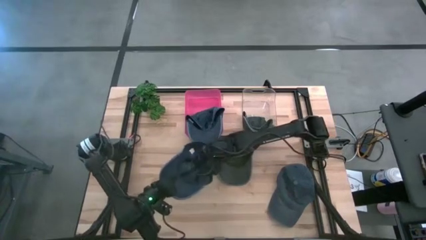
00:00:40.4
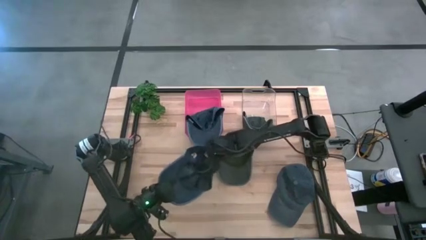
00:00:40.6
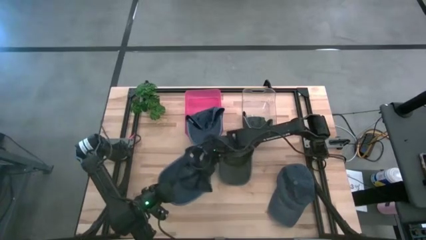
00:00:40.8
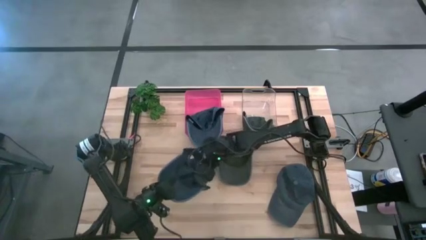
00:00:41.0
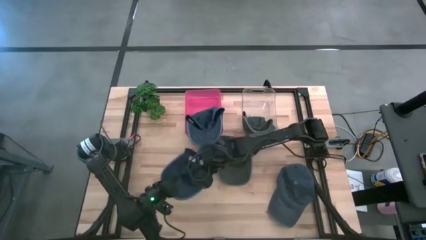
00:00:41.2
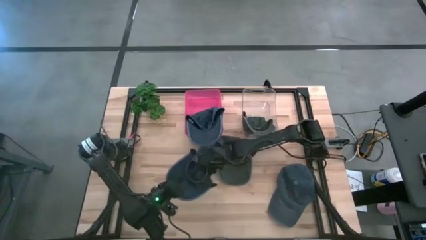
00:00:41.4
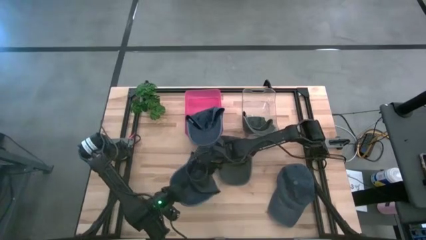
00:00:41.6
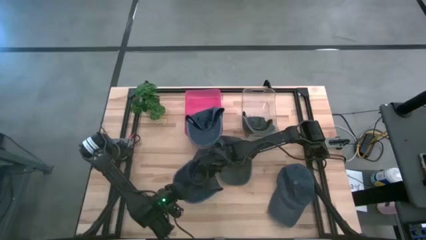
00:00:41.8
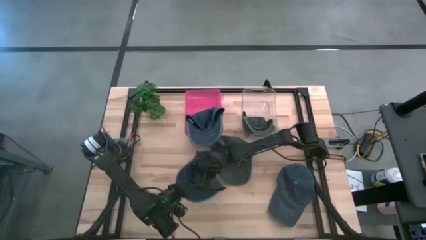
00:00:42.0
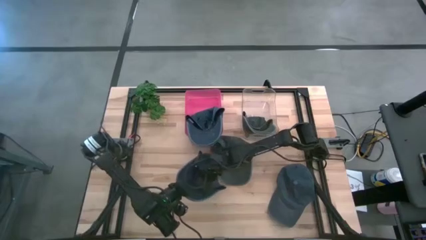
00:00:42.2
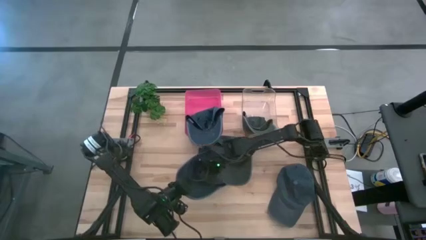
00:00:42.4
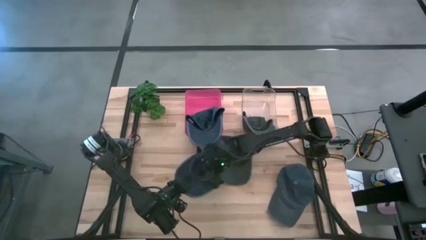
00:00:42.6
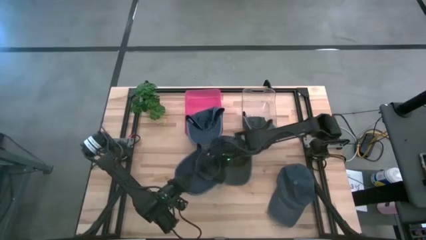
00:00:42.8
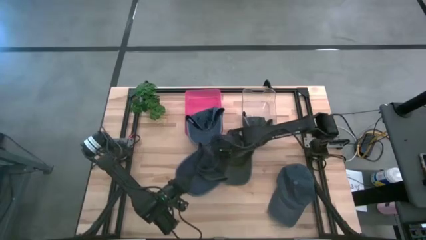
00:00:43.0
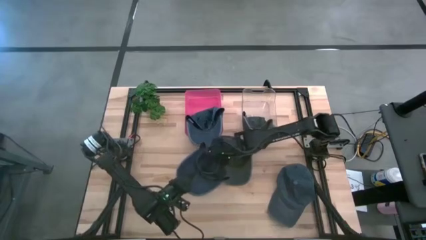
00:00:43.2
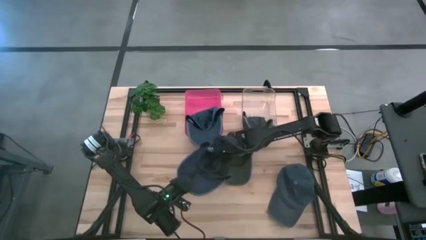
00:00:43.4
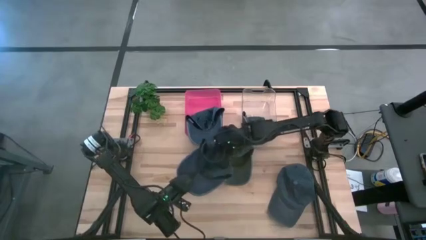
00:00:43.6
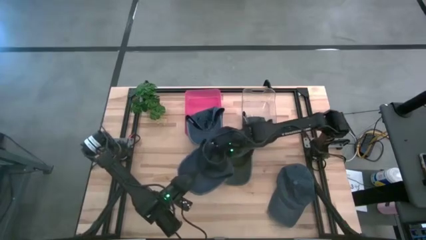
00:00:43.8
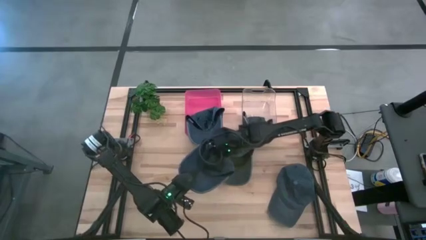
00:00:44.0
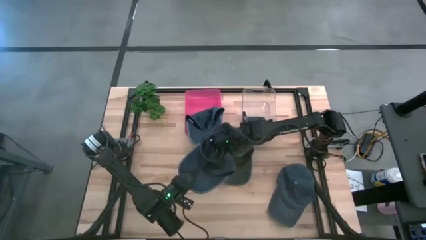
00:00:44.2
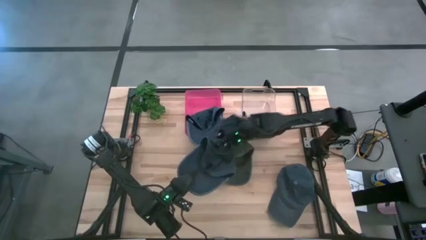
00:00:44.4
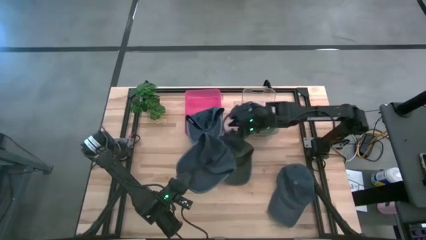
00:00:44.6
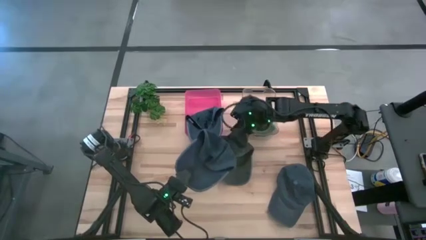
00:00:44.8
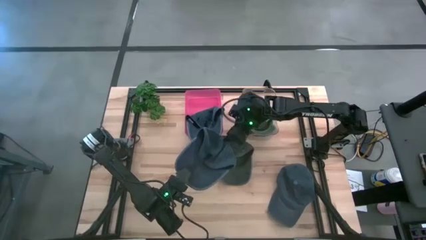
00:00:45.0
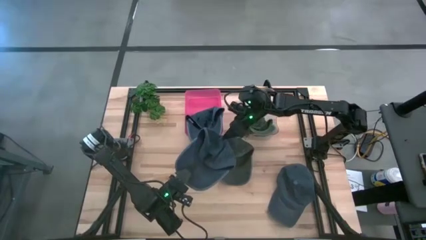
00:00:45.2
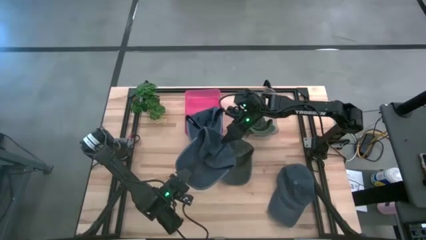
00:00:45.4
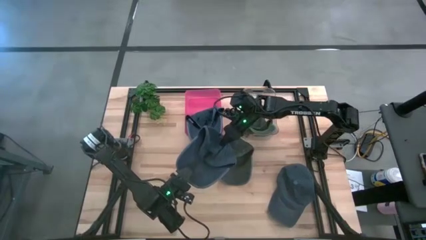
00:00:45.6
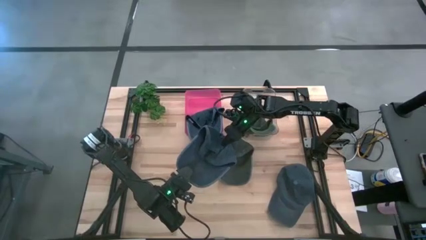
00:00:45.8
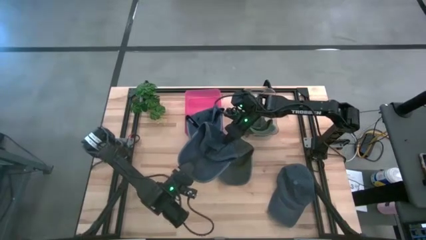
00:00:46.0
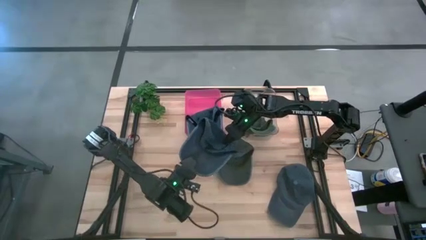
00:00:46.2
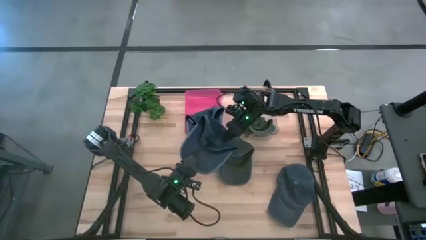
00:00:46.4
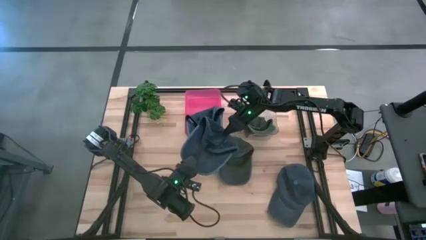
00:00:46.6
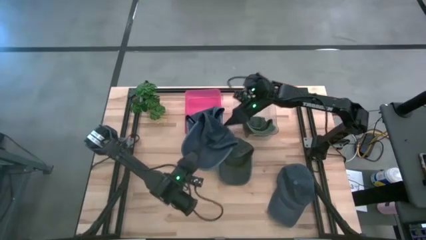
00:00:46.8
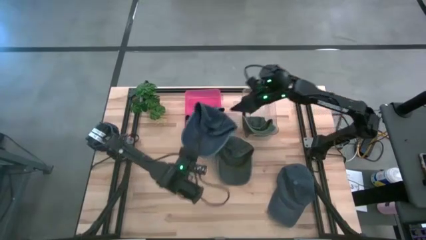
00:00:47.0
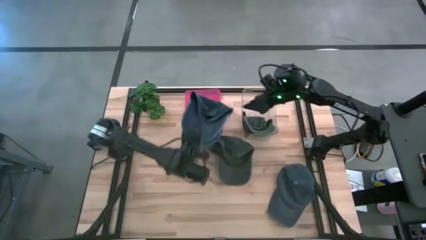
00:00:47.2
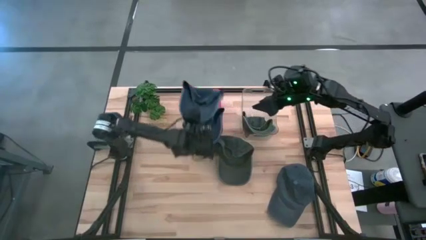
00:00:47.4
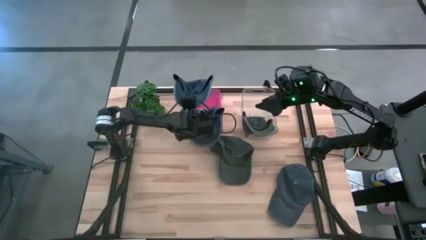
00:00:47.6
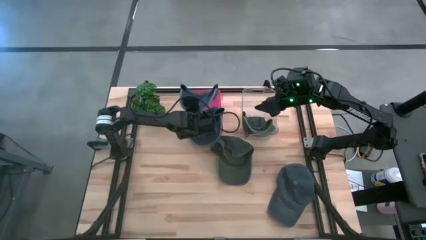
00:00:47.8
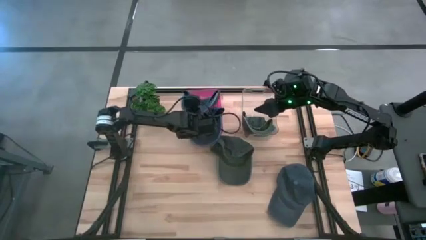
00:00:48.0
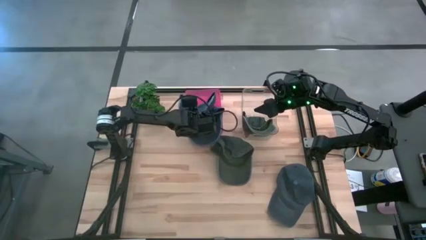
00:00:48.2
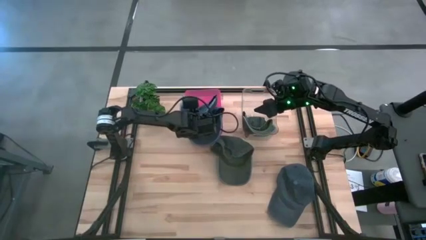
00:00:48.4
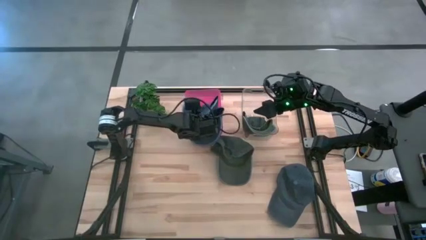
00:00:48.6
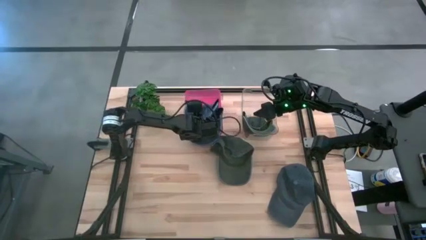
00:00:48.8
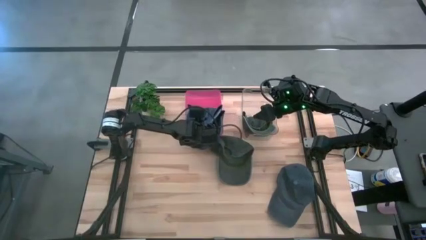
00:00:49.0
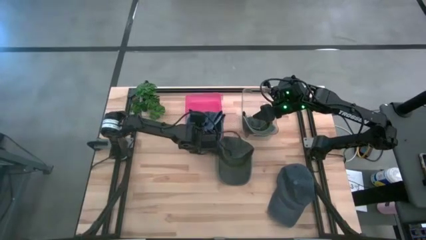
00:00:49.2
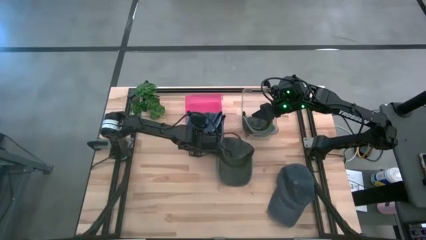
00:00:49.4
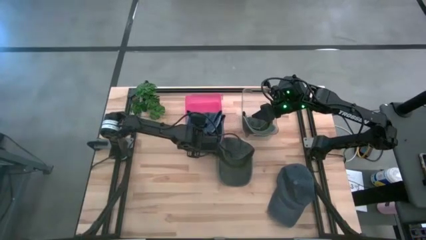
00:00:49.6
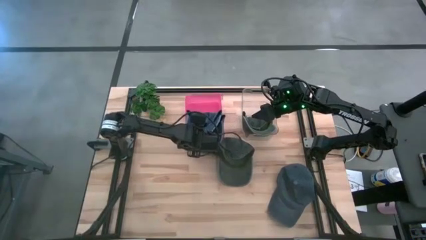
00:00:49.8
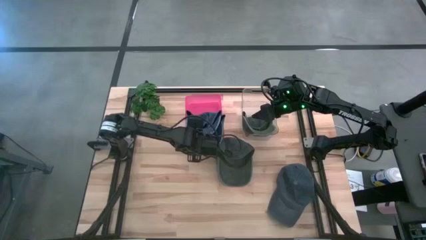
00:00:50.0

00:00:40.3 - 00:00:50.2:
Task: Pick & Place hat
Put the top blue cap into the red bin

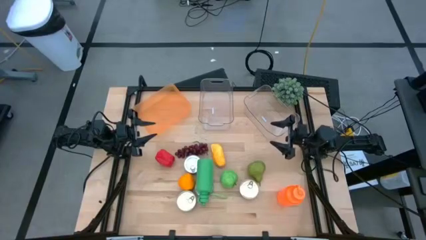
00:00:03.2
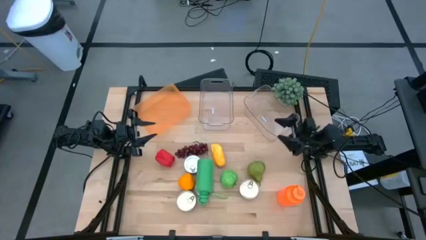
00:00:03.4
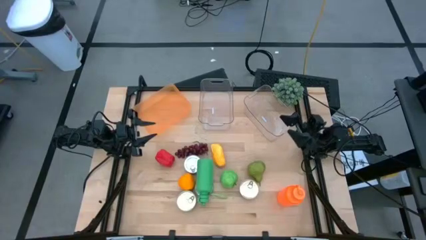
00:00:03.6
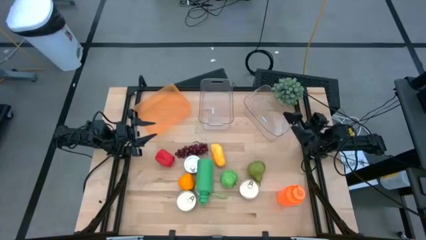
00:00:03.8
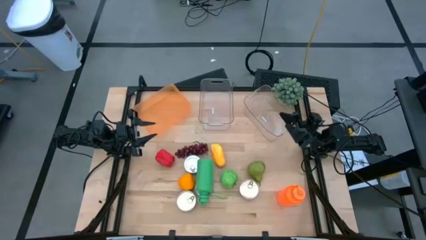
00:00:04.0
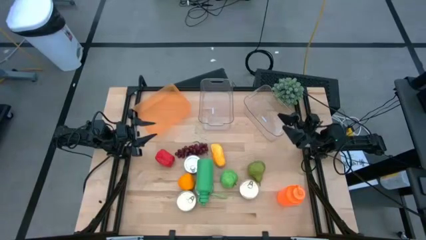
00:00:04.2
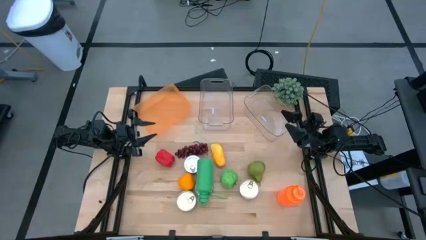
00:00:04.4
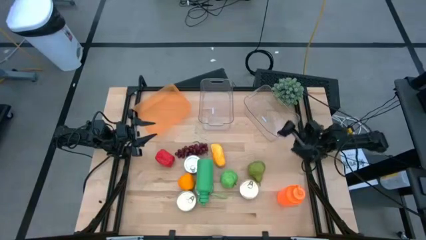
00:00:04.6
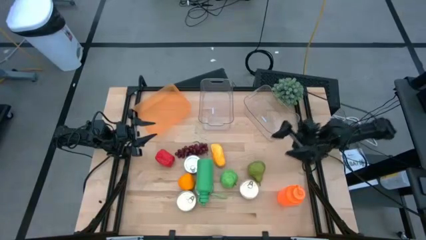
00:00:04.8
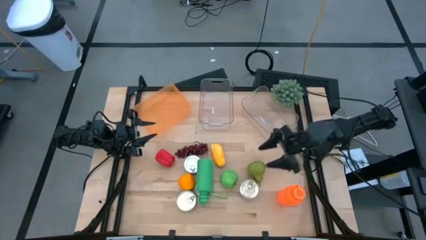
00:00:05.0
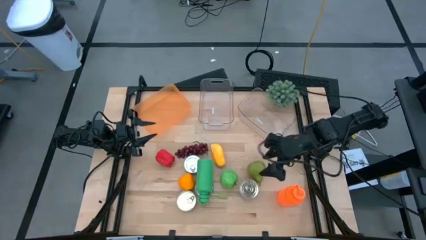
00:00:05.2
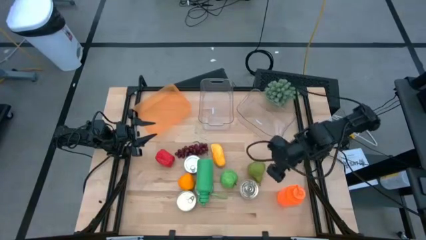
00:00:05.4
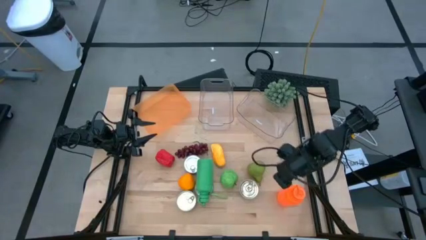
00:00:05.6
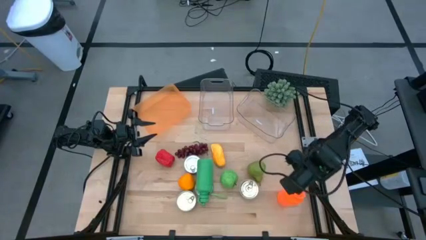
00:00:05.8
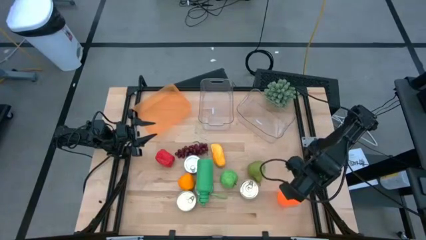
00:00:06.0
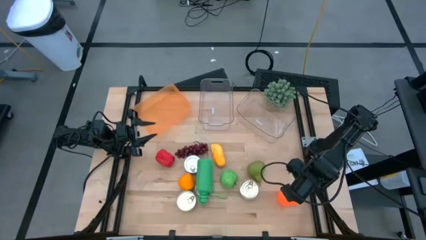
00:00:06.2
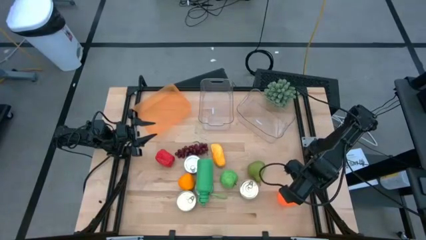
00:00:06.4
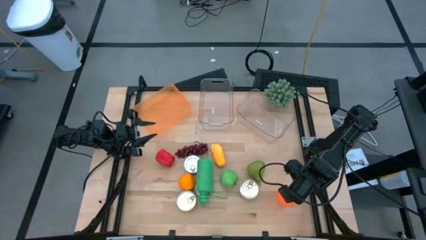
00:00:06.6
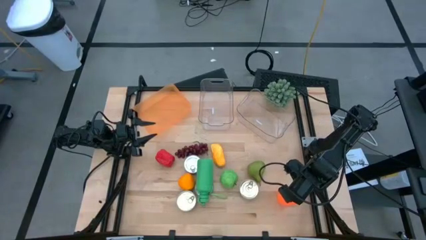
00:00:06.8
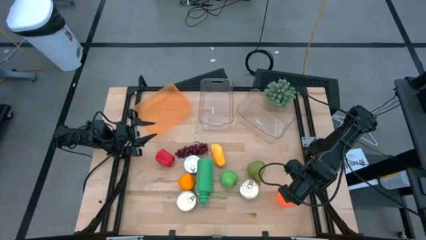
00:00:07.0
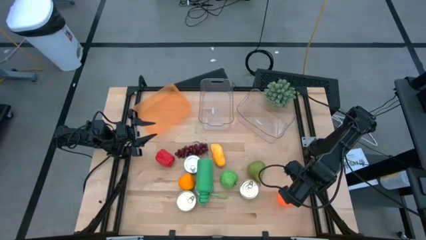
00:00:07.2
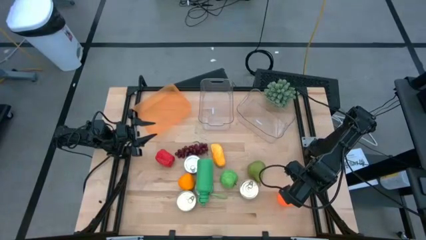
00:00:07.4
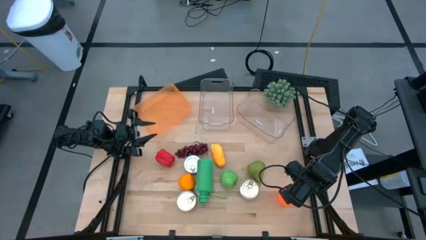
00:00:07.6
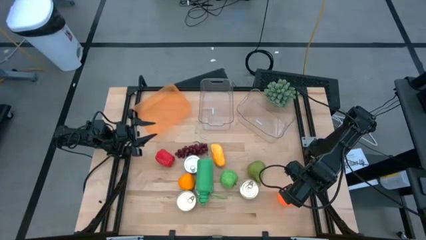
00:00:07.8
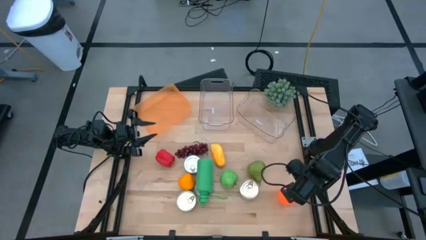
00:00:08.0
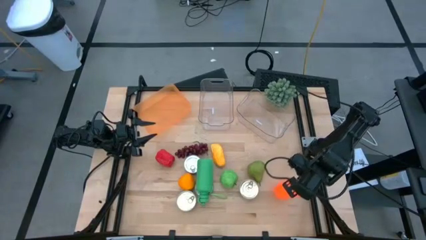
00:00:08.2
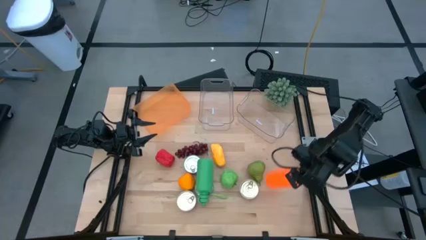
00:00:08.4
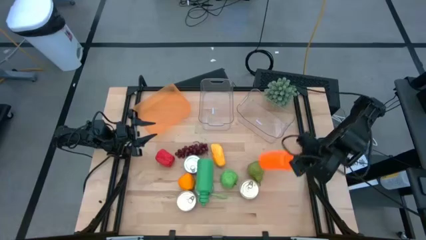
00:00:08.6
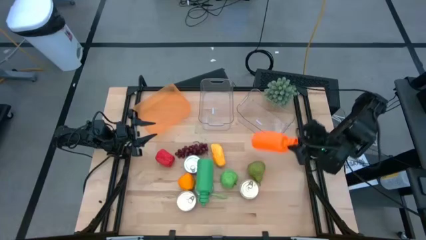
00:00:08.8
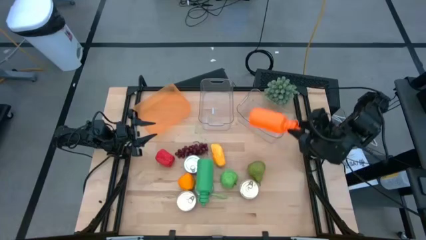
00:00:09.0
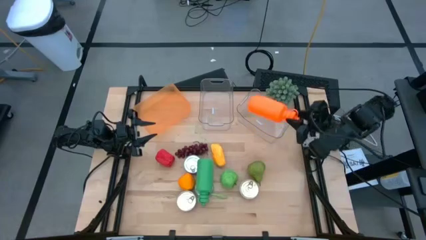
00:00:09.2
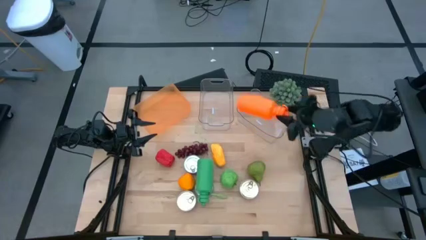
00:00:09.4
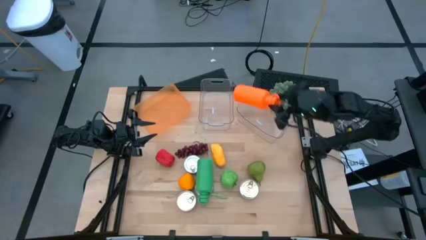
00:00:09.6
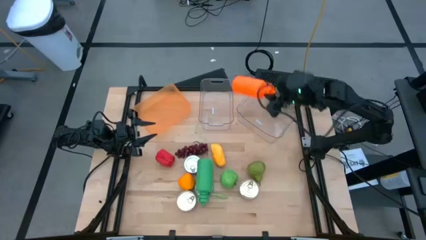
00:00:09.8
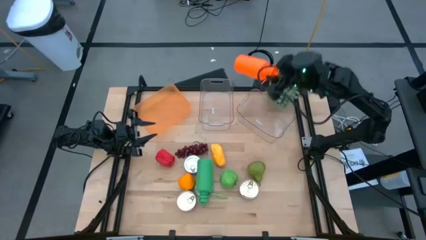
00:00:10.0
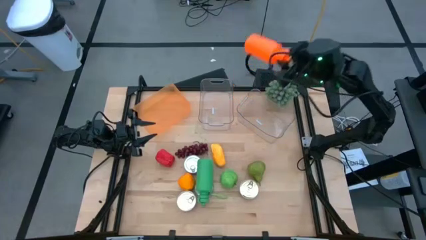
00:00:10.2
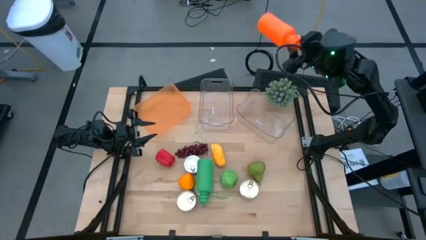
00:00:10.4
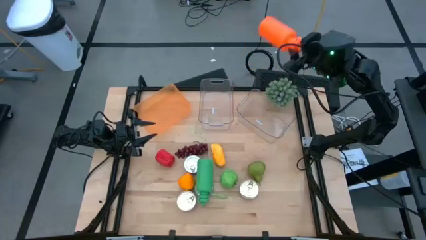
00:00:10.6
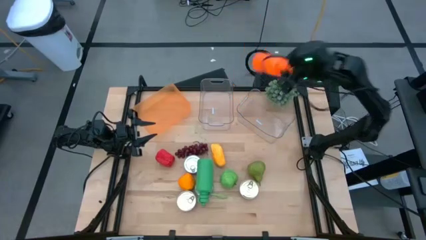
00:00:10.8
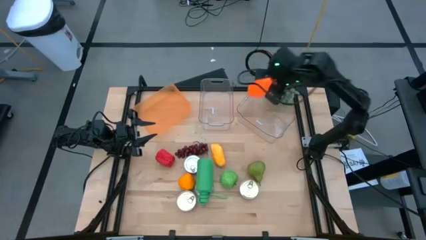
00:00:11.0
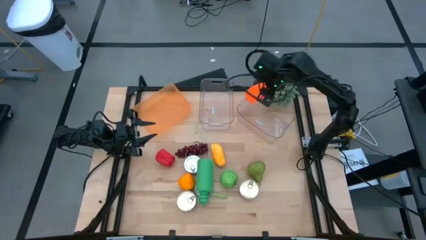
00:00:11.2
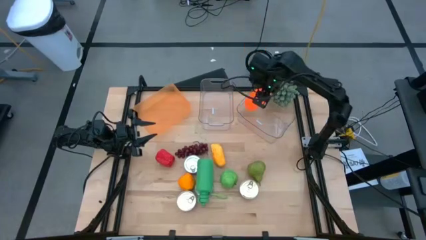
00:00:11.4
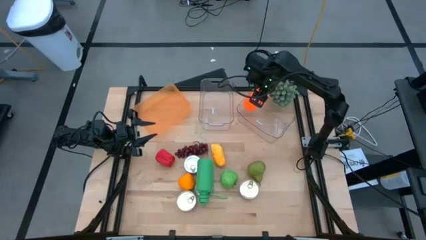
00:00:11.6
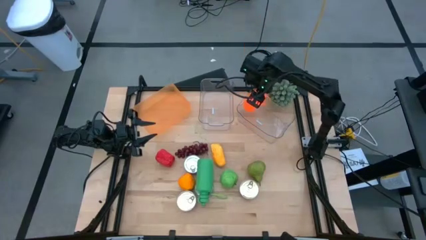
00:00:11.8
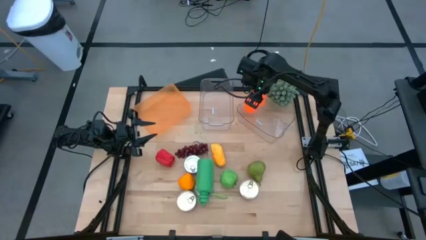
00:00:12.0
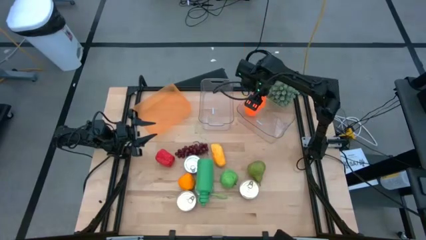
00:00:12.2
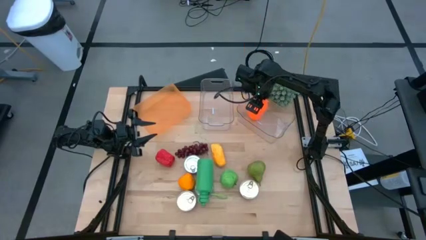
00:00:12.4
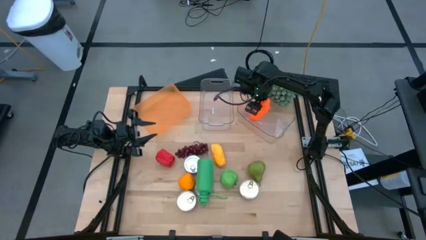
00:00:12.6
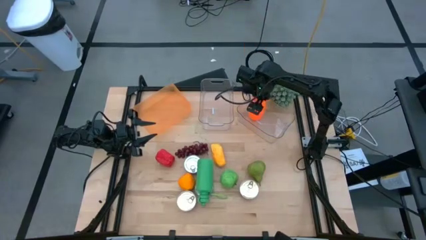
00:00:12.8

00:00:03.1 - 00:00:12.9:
Task: Pick & Place Food Item
Put the orange tumbler into the right transparent bin
